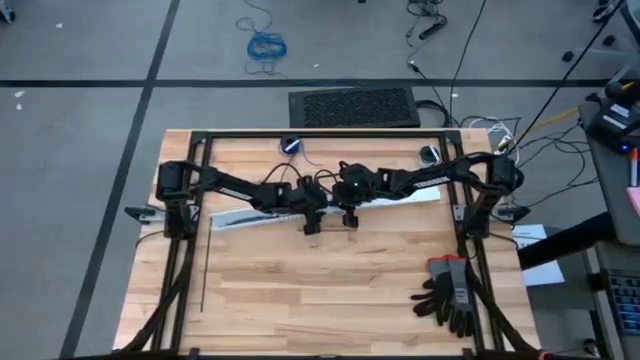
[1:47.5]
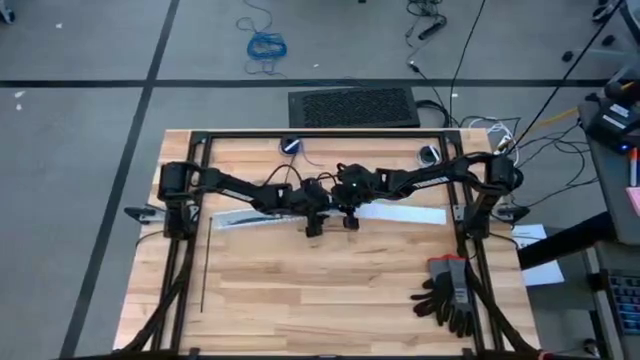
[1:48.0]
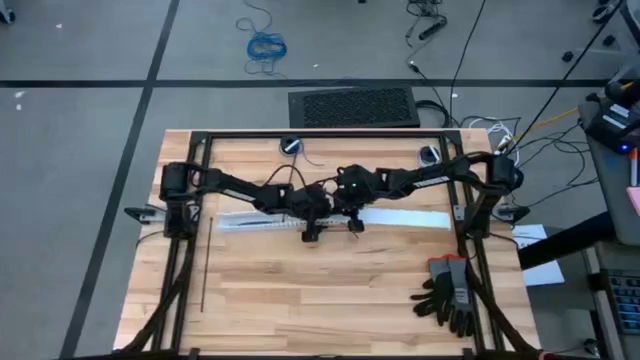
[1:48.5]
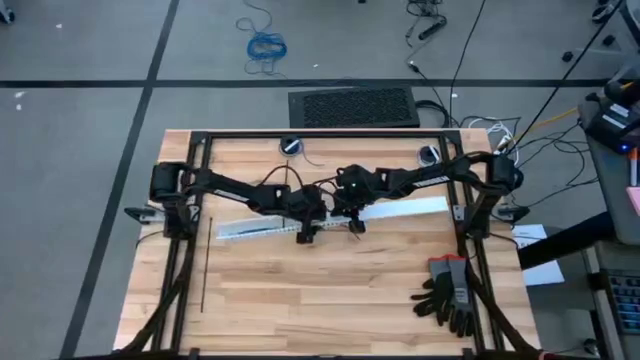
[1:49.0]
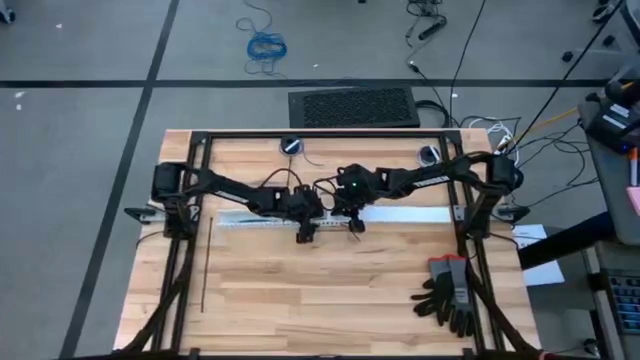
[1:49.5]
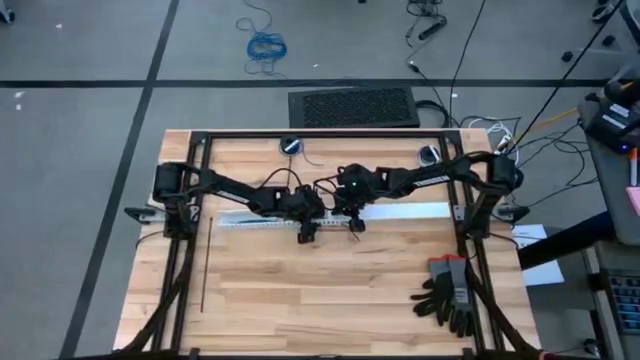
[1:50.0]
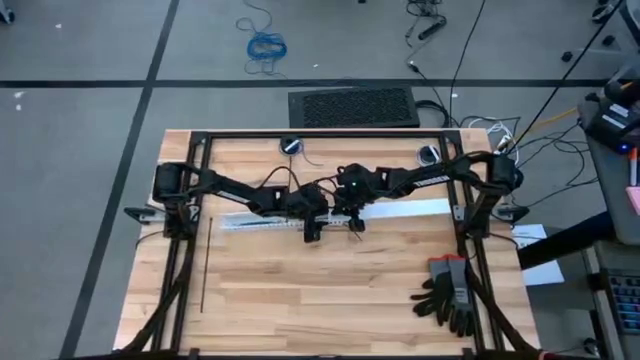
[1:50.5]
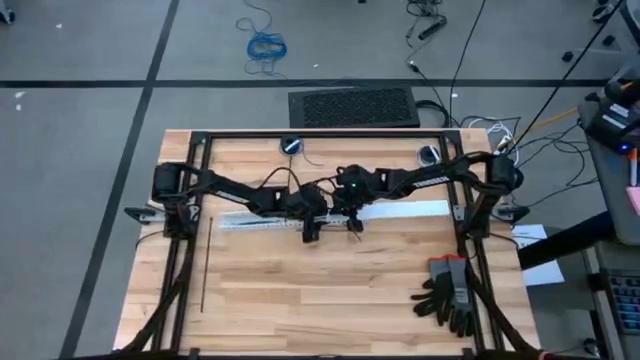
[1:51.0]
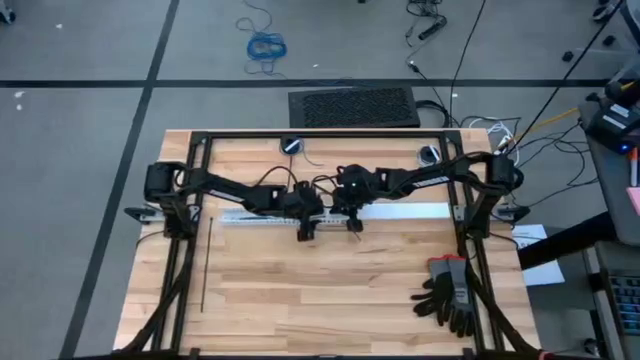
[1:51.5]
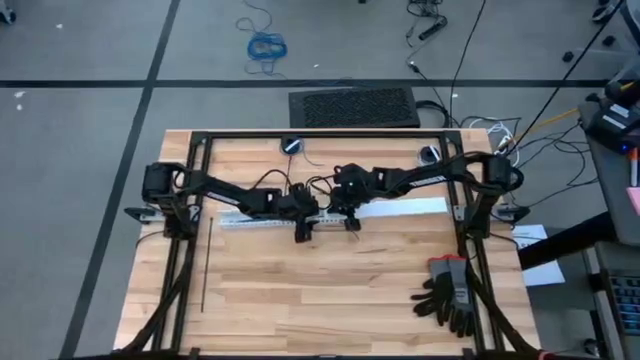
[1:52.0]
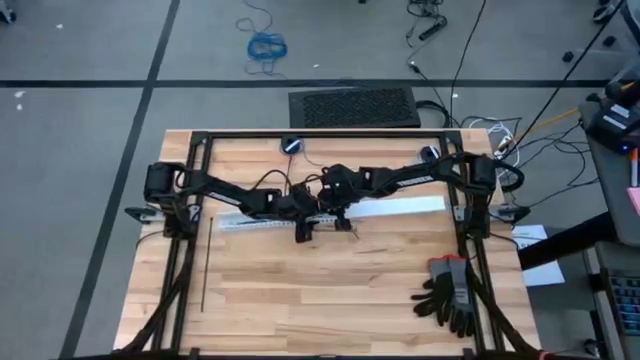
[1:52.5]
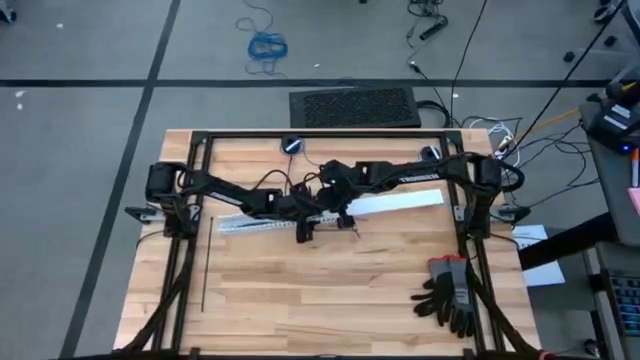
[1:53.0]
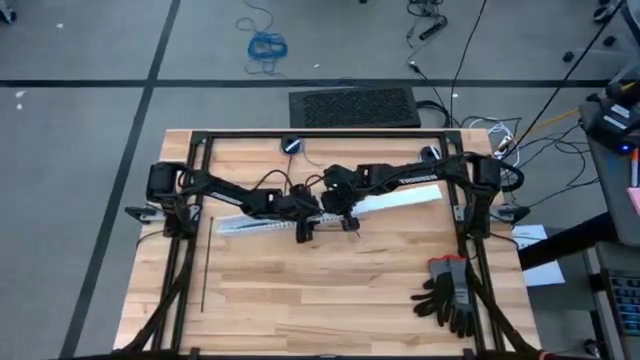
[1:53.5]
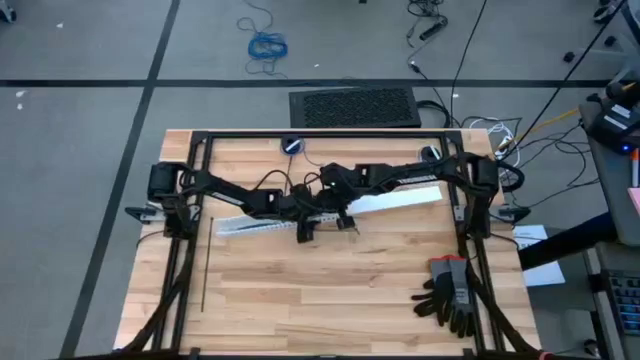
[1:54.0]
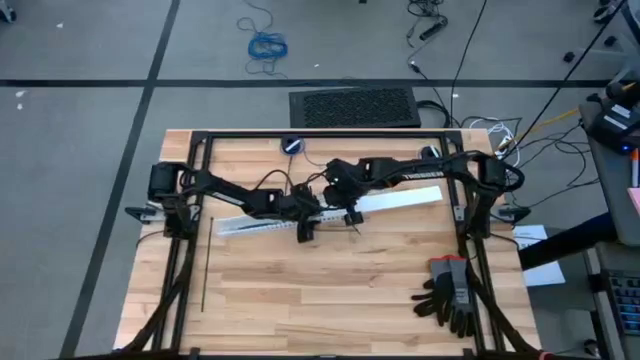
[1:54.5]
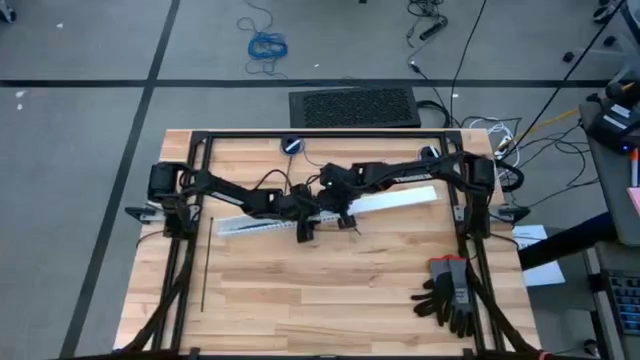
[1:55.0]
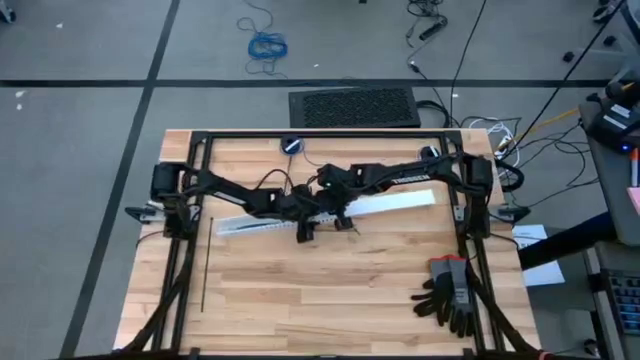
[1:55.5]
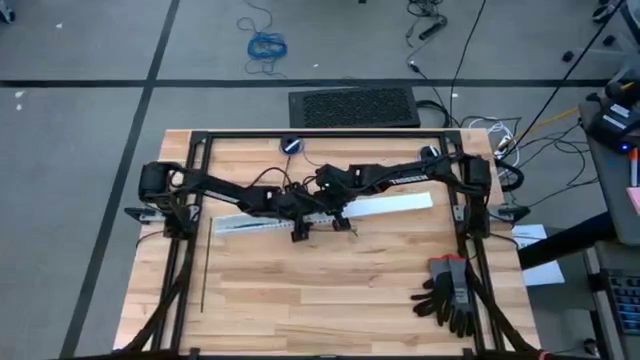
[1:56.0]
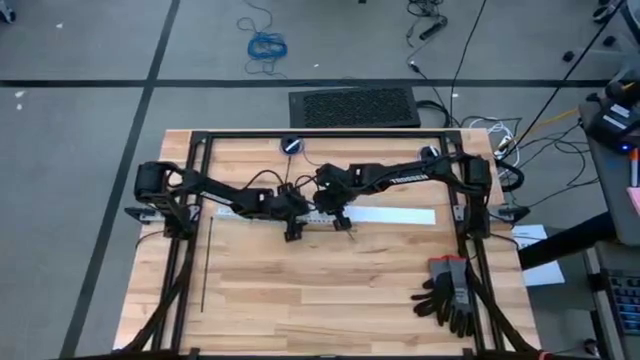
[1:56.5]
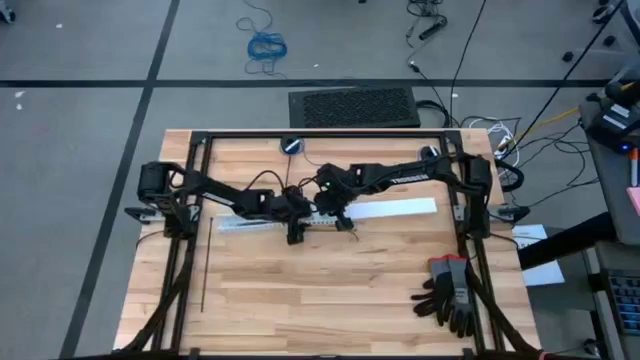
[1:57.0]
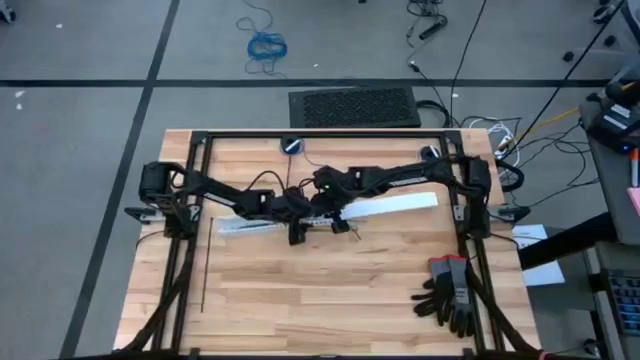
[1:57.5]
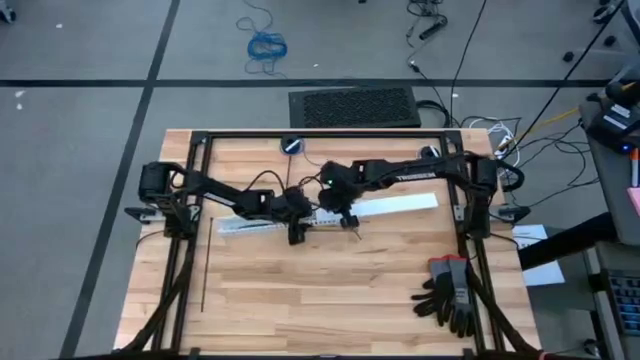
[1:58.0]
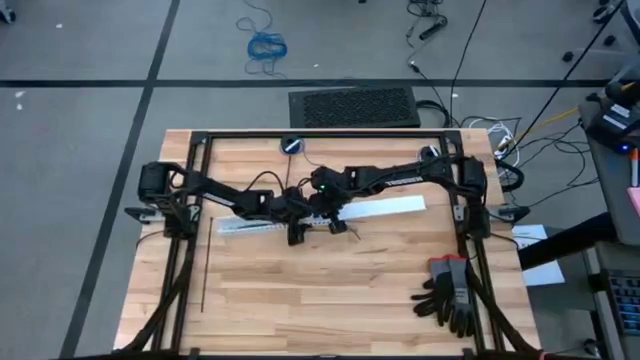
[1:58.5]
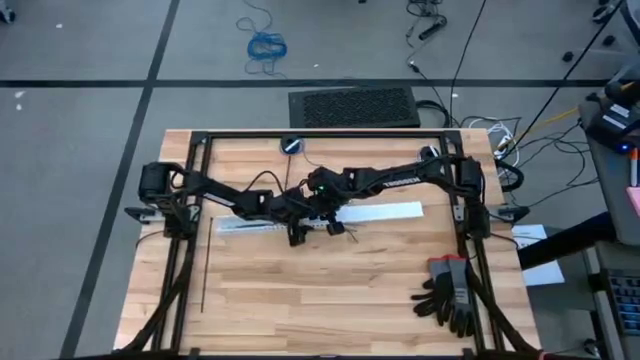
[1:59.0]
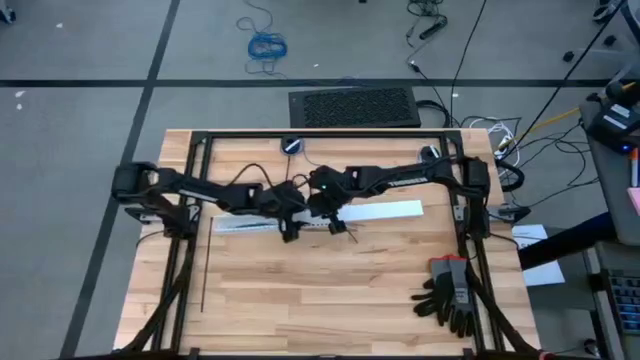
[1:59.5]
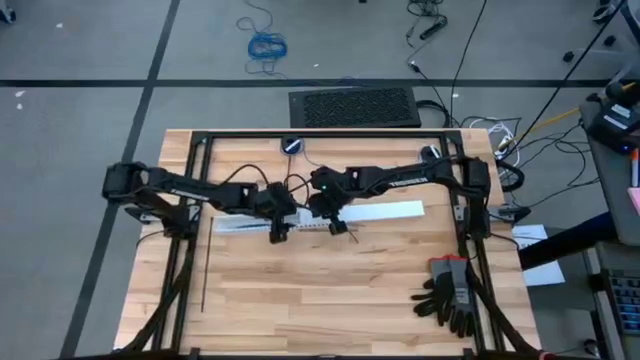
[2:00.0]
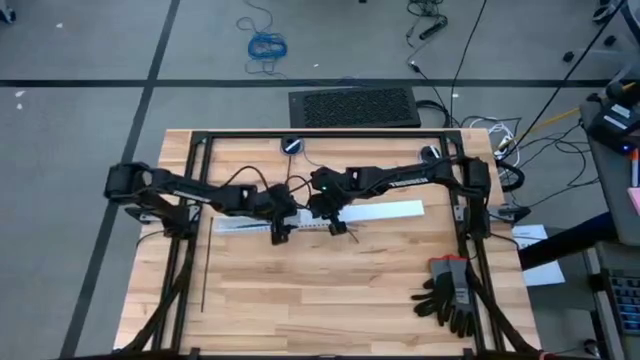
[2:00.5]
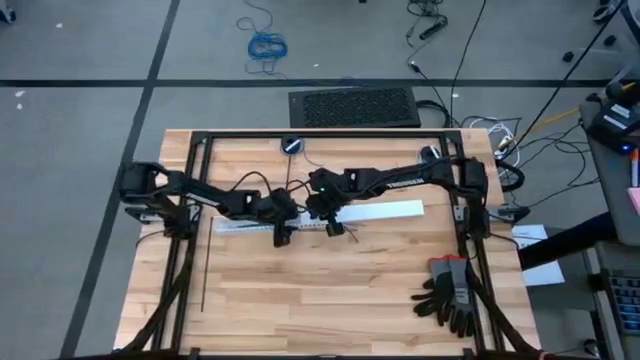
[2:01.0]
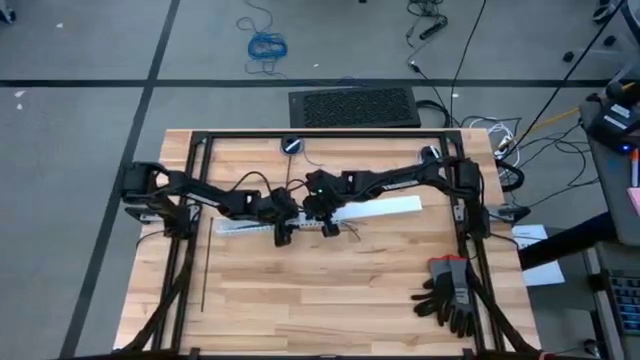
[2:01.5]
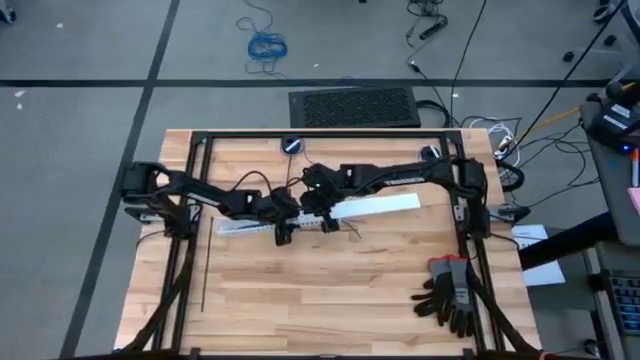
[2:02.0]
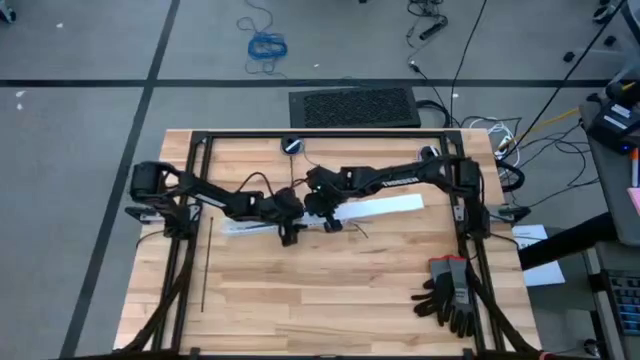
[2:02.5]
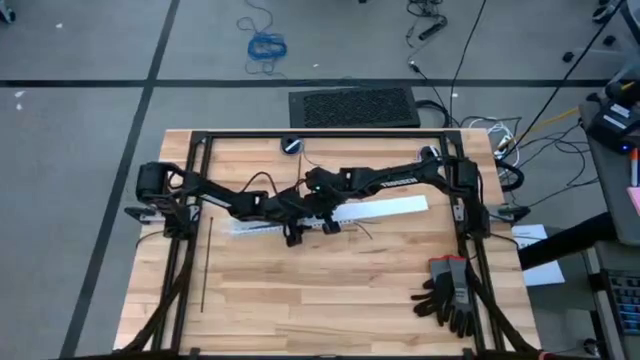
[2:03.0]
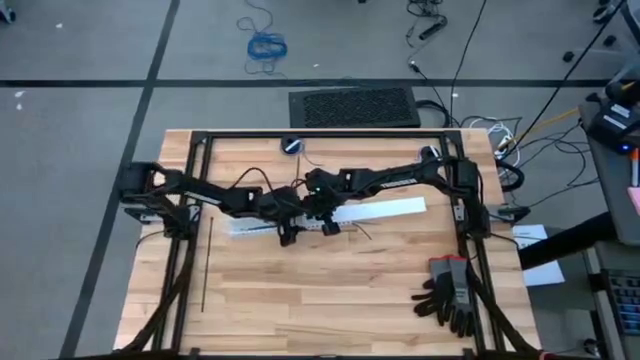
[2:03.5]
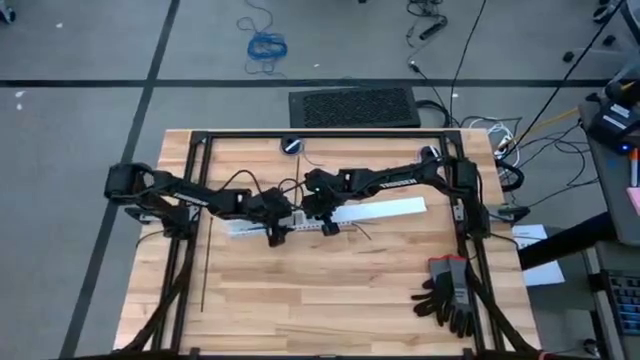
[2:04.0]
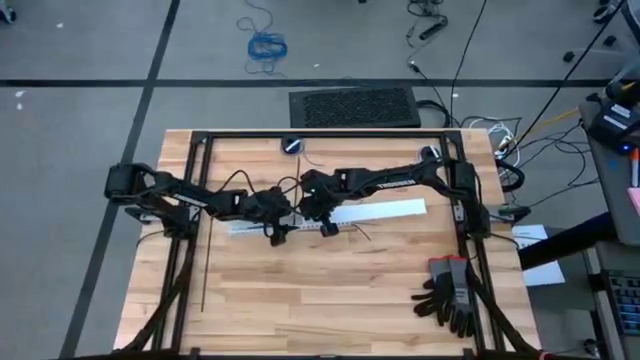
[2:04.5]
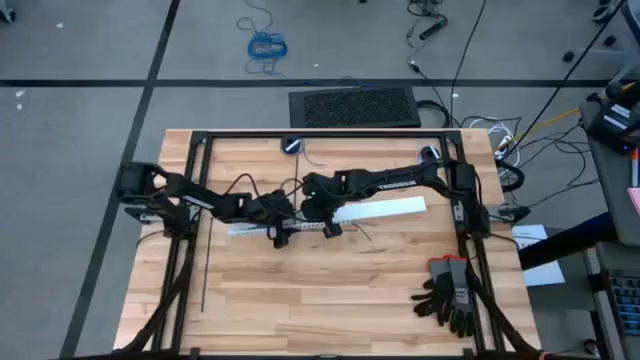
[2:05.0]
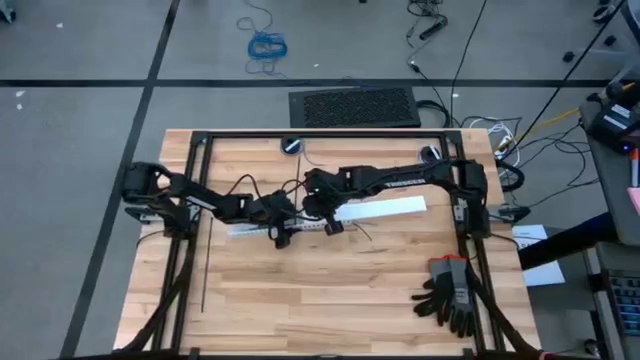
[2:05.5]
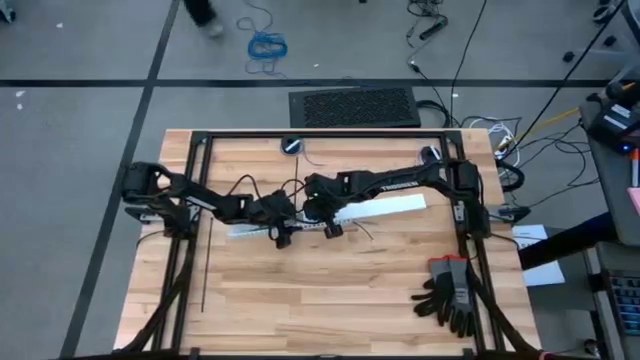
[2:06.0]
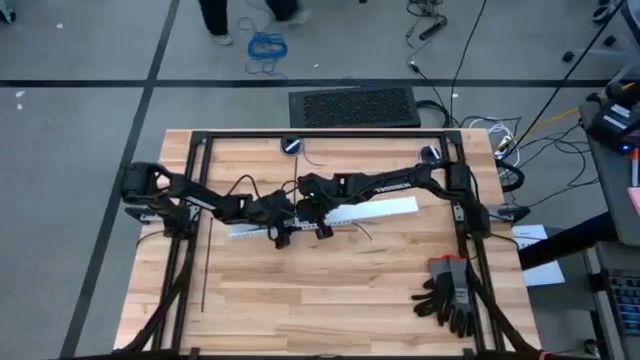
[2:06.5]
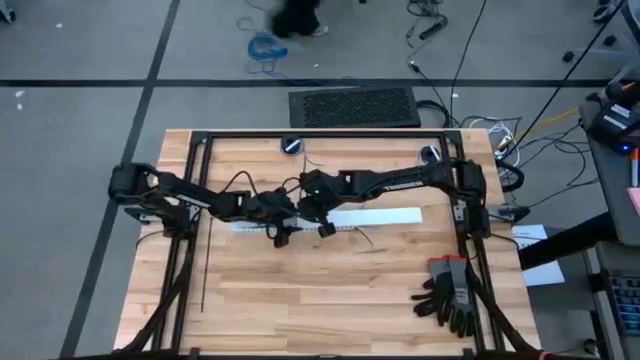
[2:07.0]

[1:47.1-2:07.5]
Task: Ziptie cables
Close the cable duct

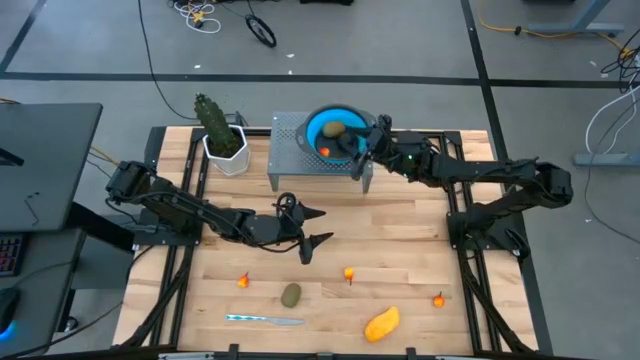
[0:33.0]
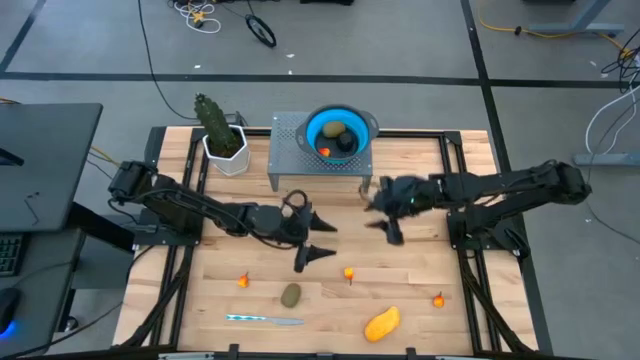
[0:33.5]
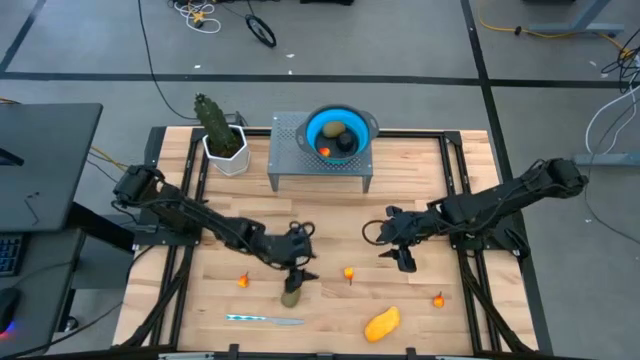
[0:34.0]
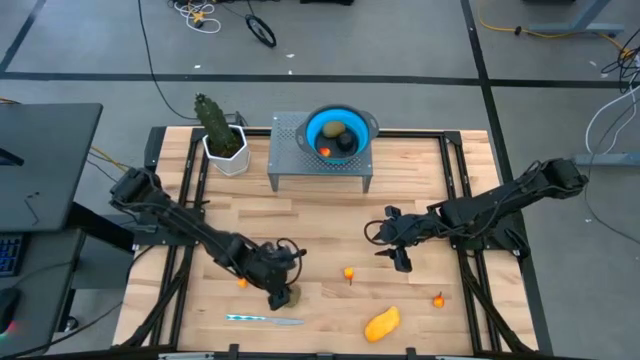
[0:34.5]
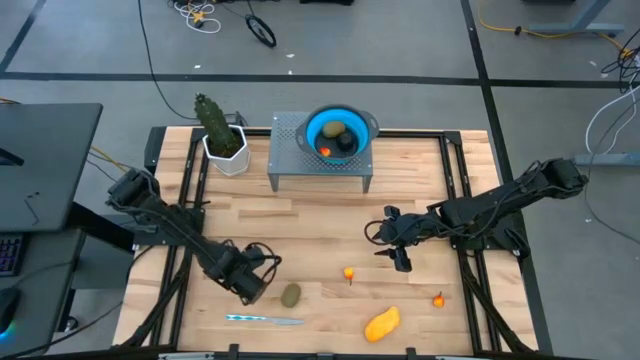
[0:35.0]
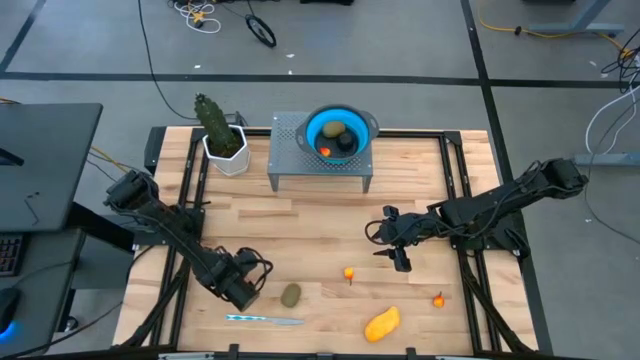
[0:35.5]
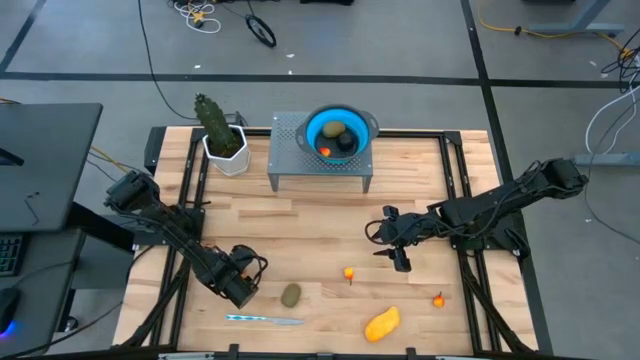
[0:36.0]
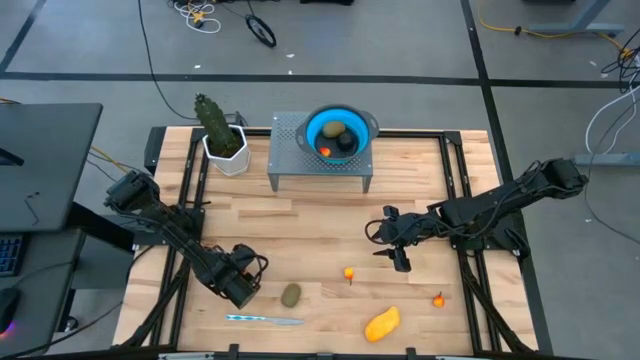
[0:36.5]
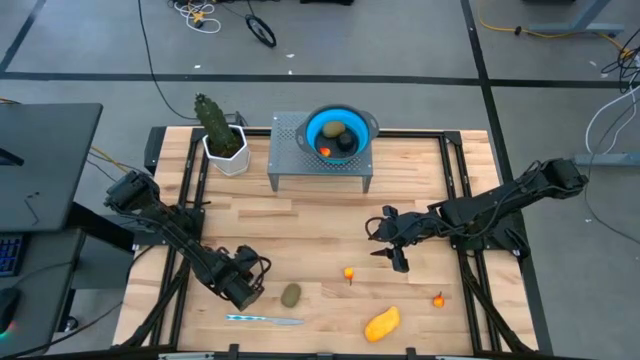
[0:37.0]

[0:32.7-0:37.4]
Task: Pick & Place Fruit
Put the orange peach in the blue strainer bowl on the shelf
